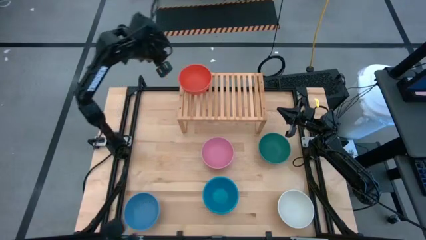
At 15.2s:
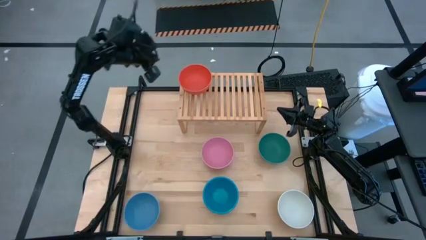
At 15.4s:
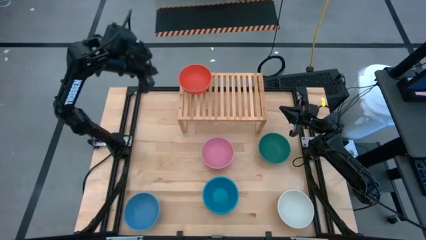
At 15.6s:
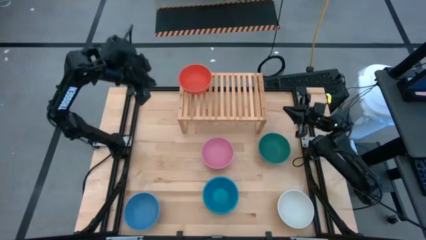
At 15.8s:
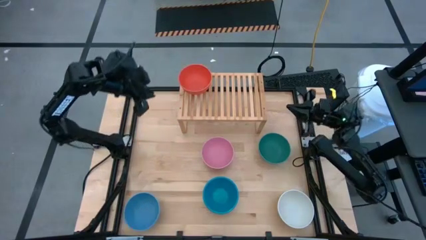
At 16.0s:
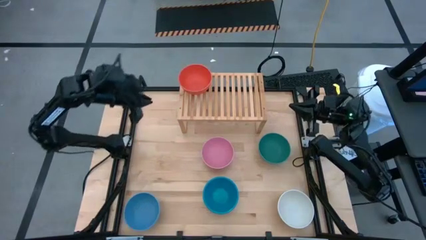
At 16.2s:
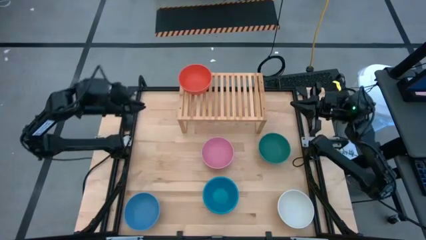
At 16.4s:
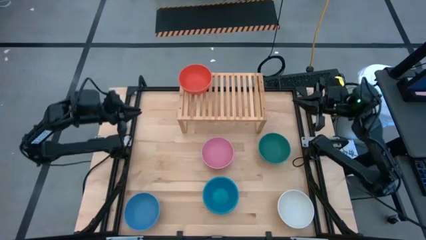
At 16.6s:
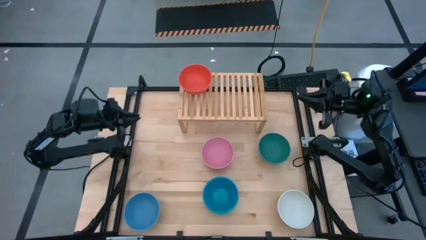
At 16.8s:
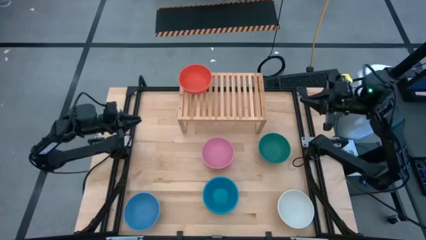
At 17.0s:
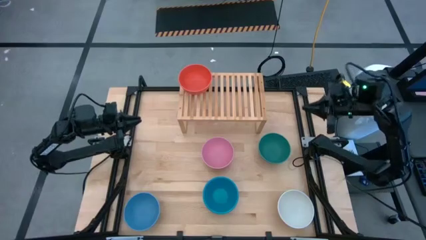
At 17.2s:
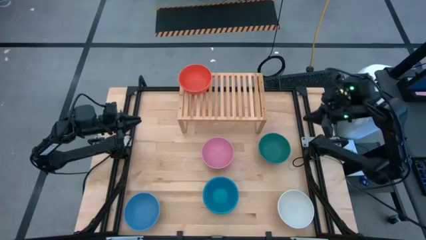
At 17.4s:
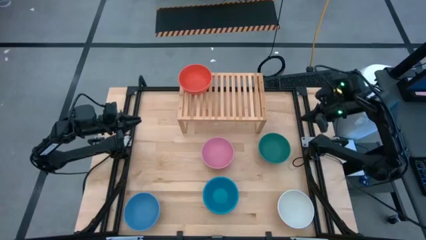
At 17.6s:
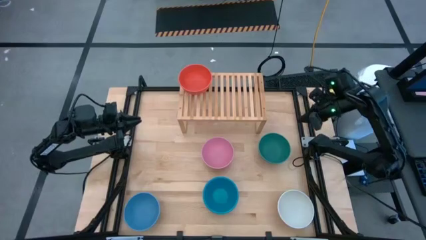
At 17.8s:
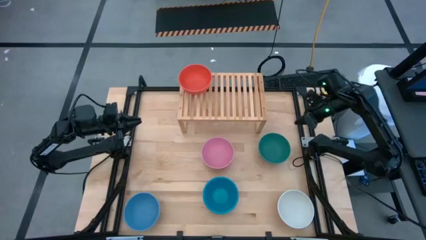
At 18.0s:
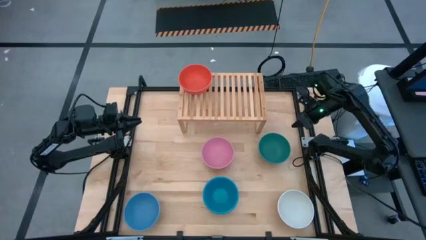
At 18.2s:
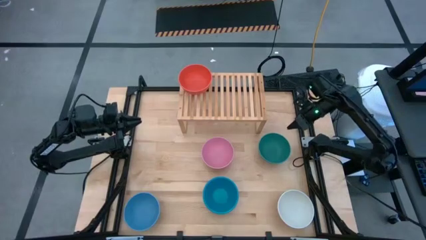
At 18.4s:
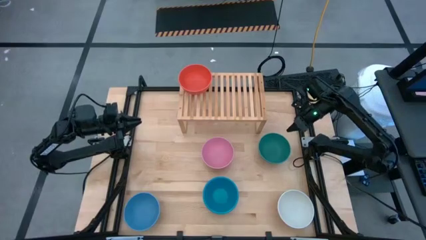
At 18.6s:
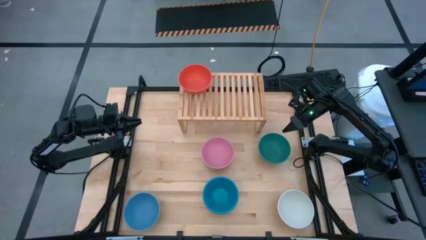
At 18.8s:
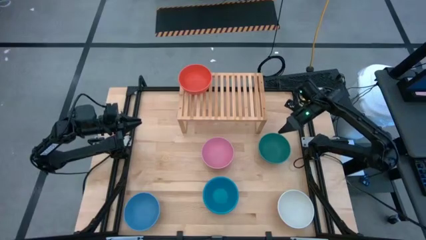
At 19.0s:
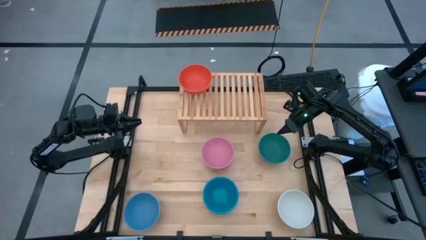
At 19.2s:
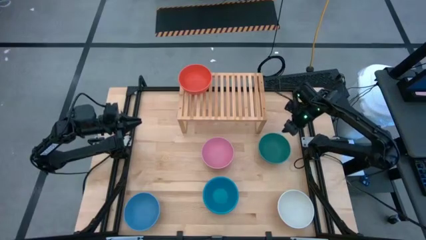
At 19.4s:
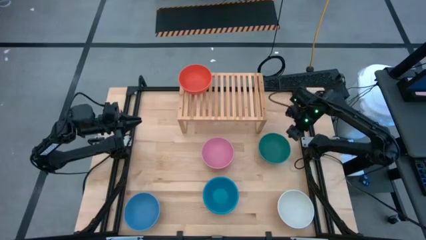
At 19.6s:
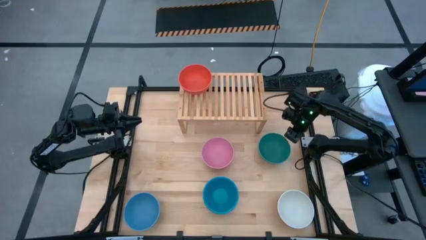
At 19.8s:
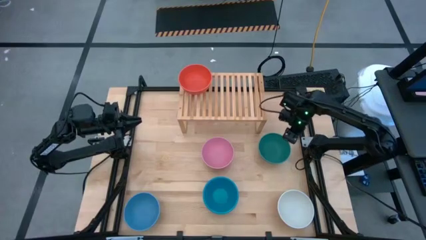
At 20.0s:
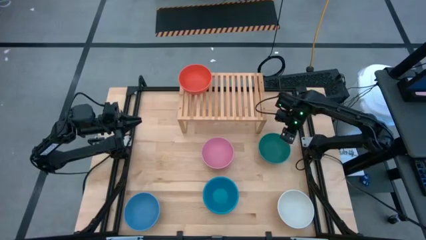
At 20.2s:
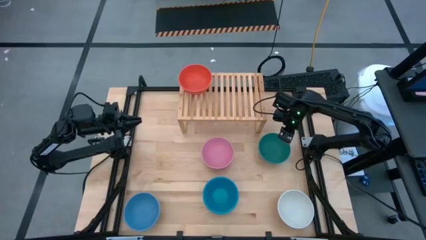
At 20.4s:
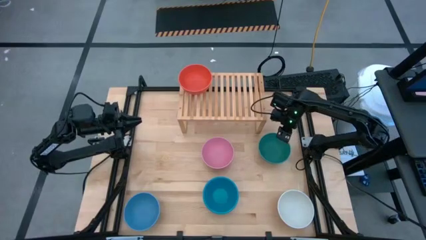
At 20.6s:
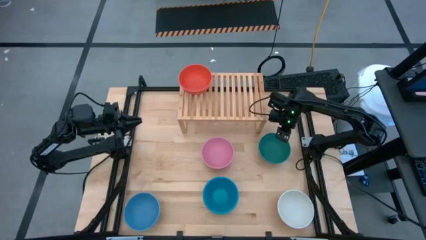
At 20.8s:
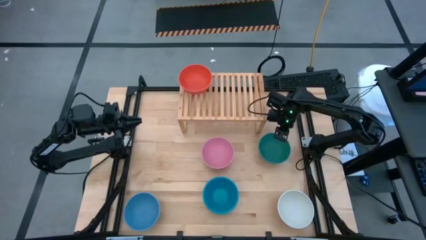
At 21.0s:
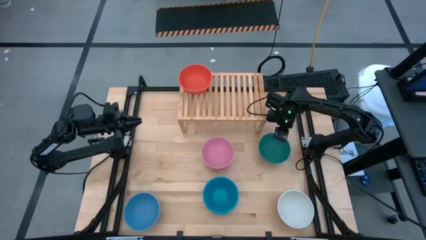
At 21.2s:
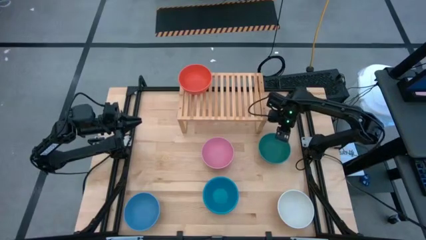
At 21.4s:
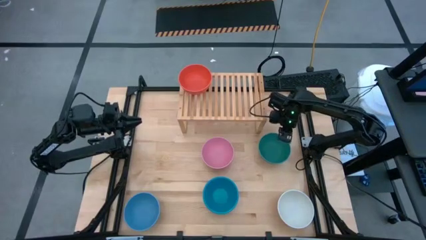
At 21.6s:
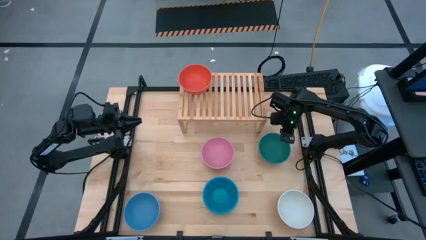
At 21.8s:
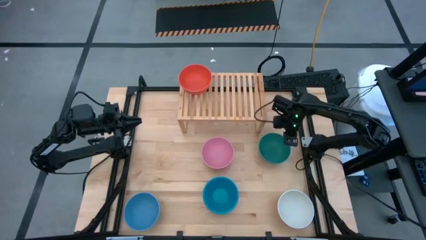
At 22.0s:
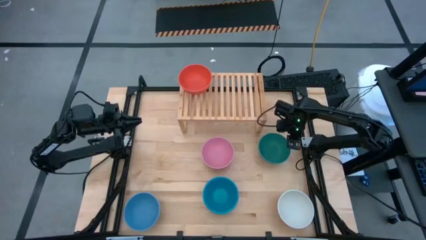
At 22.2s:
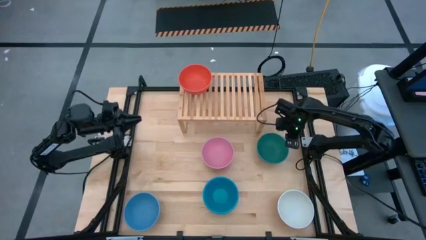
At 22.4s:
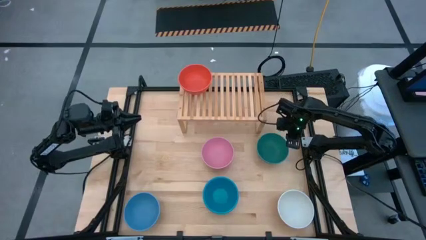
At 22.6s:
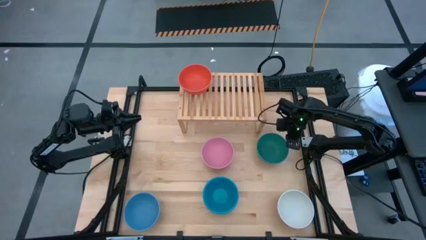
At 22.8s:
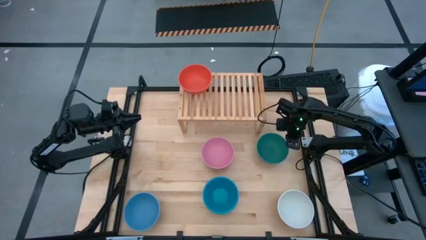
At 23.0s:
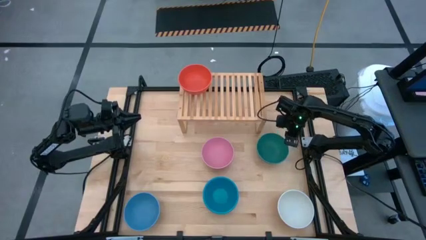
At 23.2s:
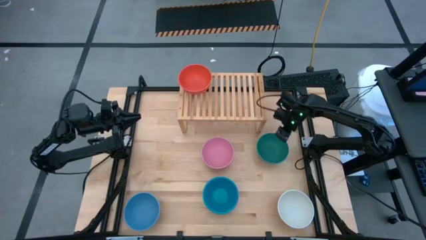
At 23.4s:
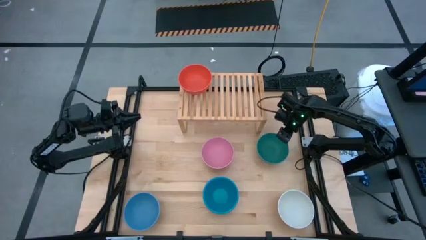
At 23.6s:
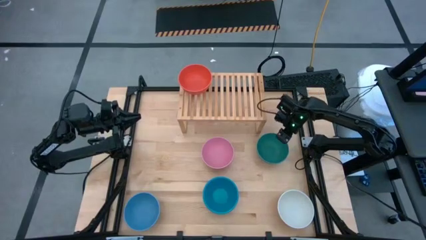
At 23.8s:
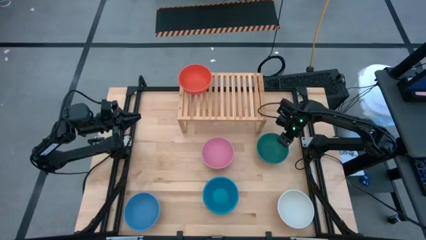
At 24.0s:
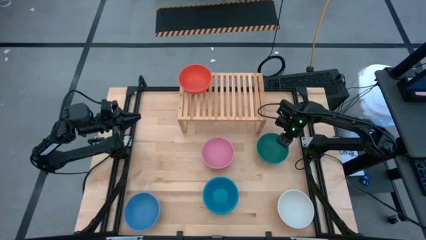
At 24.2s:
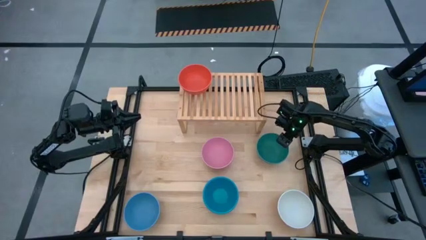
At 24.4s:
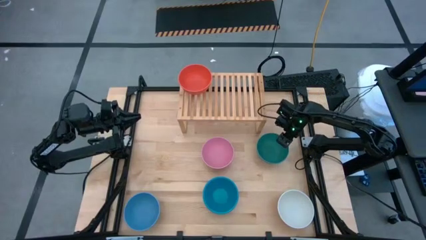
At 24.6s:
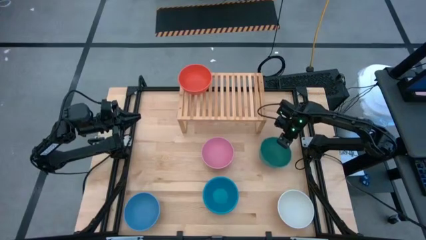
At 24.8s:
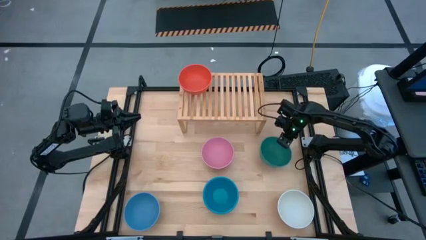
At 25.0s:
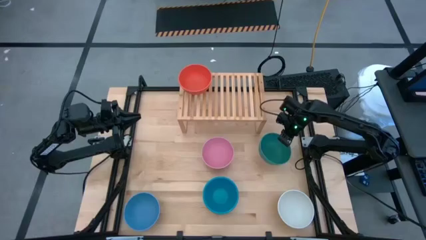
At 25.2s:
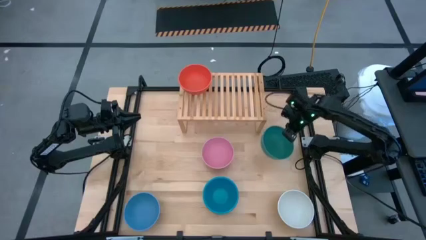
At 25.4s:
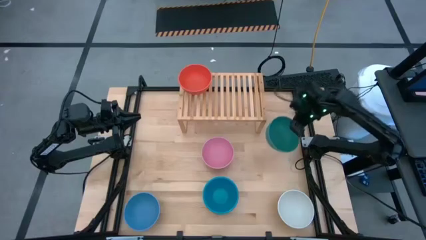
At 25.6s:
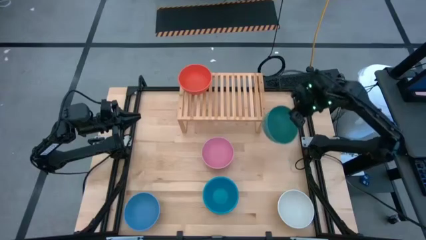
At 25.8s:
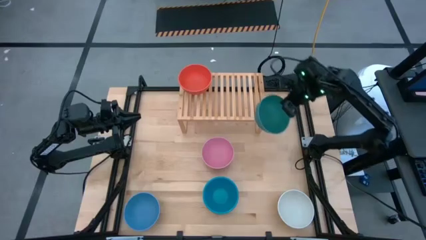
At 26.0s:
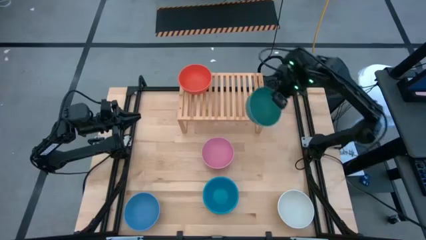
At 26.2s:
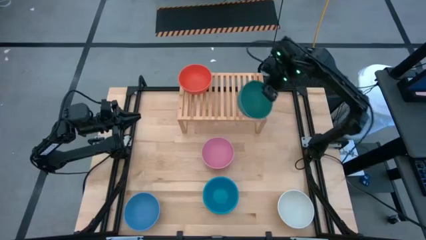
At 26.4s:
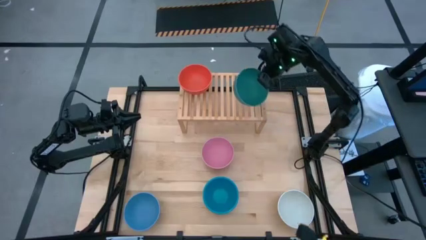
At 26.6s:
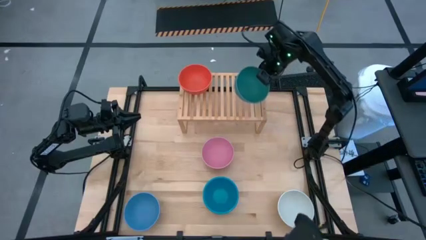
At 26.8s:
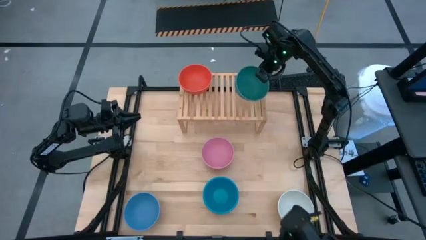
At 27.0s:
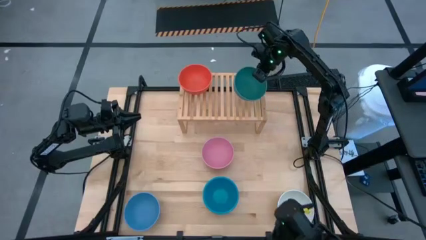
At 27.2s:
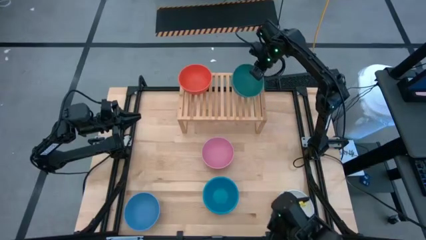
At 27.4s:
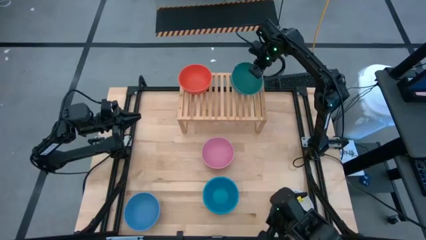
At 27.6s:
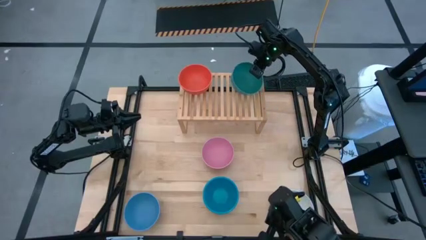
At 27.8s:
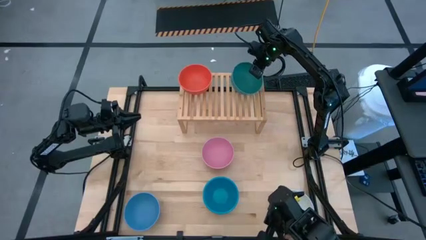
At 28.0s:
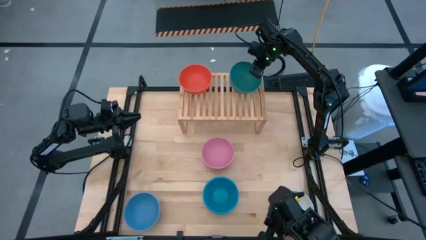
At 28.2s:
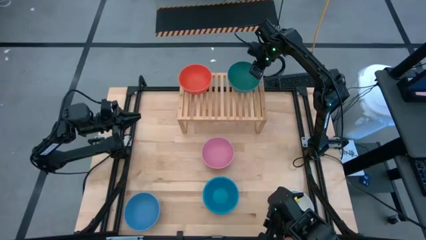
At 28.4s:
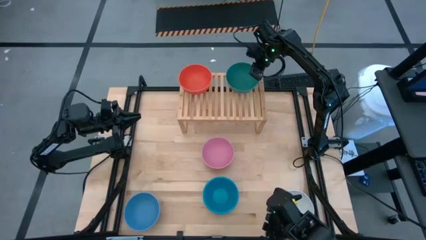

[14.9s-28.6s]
Task: Place and stack bowls onto a shelf
Put the green bowl on the shelf
